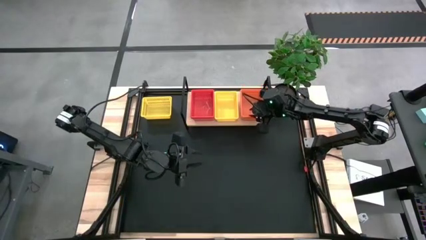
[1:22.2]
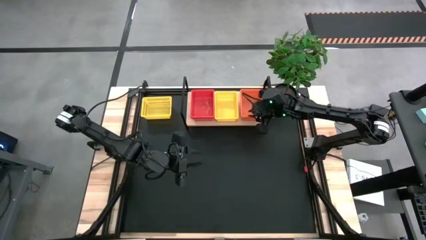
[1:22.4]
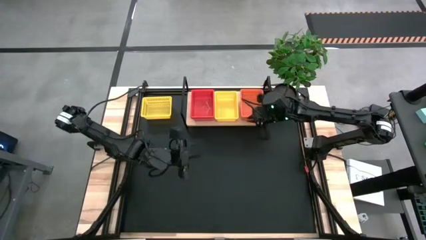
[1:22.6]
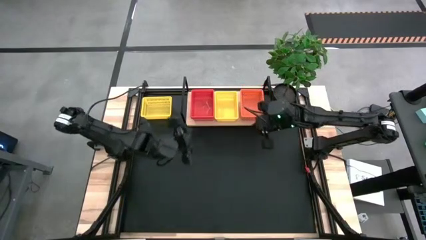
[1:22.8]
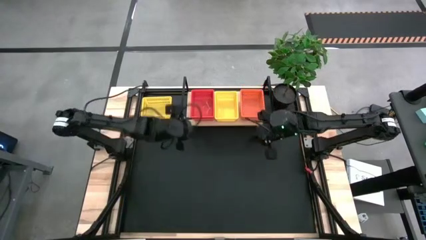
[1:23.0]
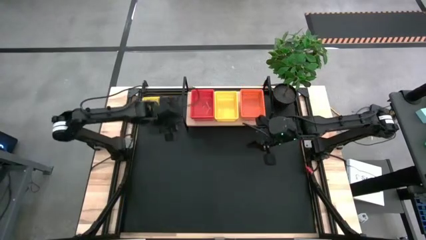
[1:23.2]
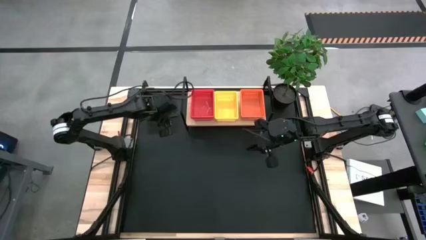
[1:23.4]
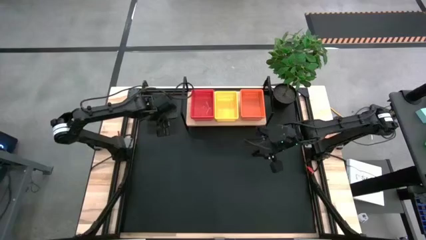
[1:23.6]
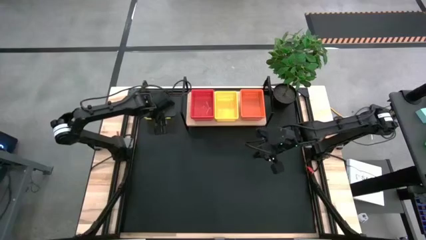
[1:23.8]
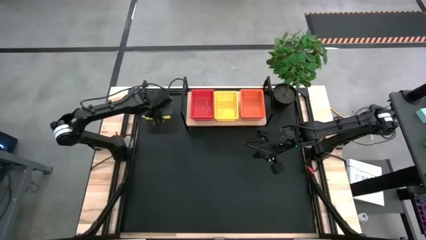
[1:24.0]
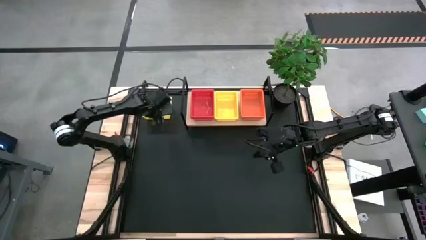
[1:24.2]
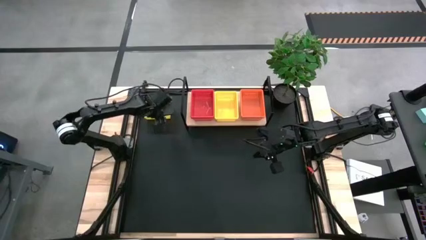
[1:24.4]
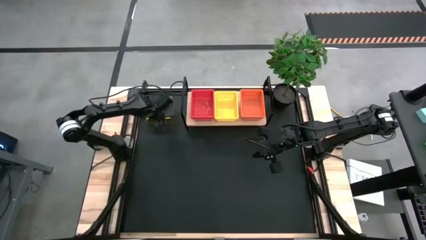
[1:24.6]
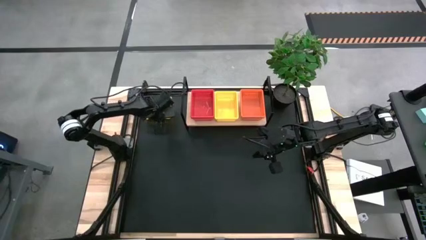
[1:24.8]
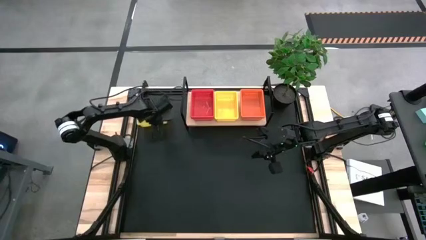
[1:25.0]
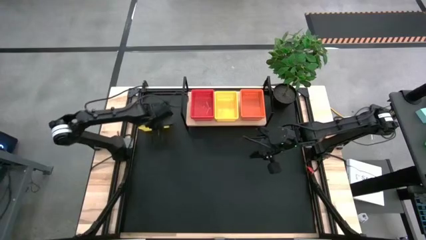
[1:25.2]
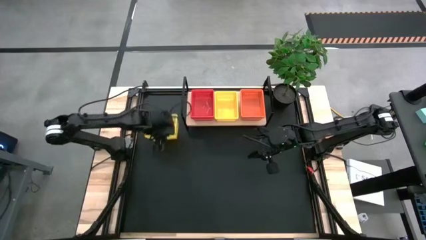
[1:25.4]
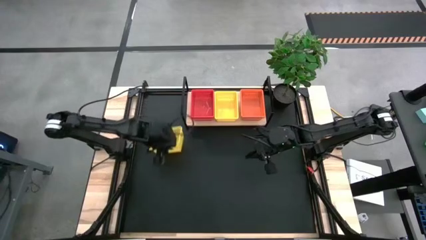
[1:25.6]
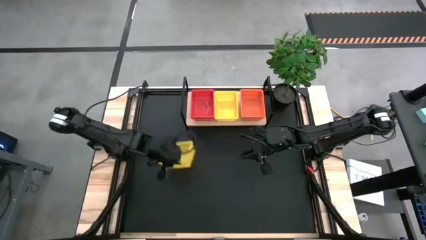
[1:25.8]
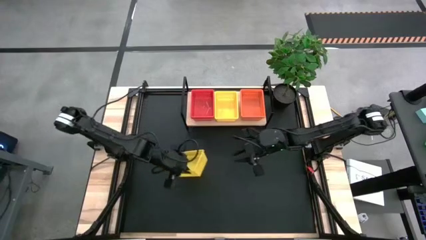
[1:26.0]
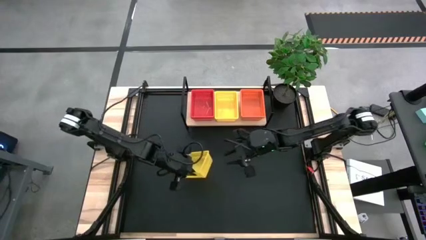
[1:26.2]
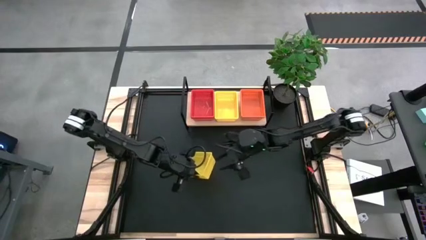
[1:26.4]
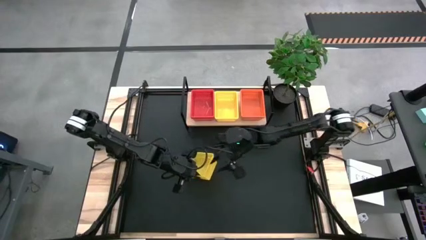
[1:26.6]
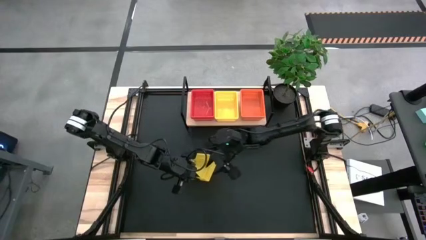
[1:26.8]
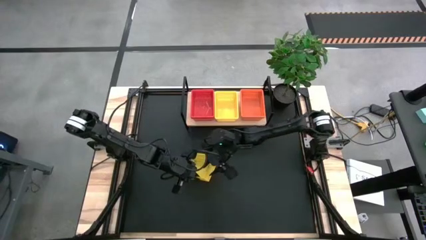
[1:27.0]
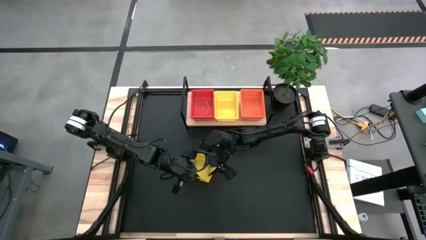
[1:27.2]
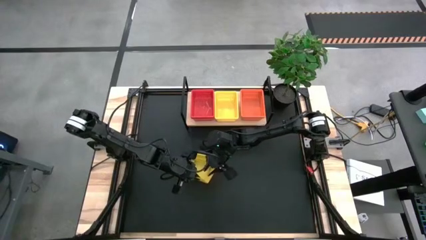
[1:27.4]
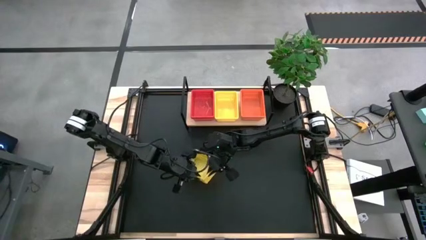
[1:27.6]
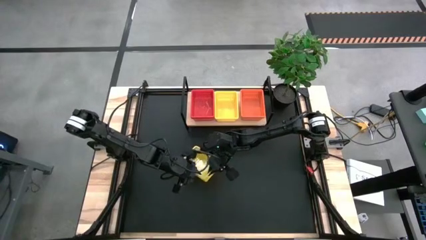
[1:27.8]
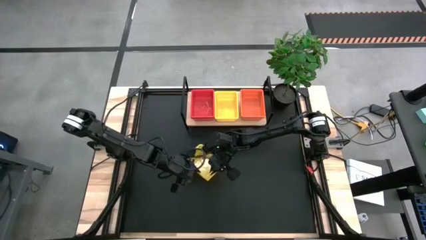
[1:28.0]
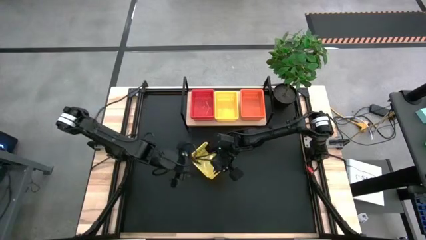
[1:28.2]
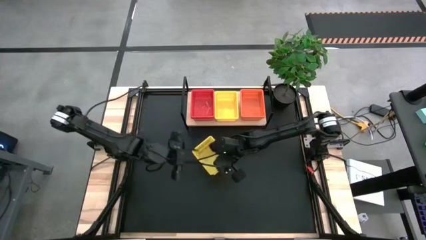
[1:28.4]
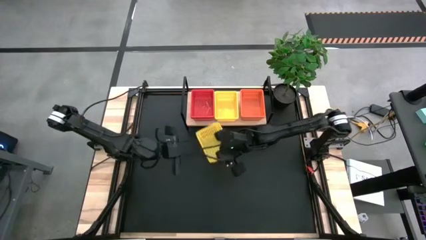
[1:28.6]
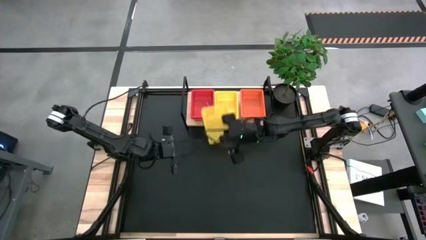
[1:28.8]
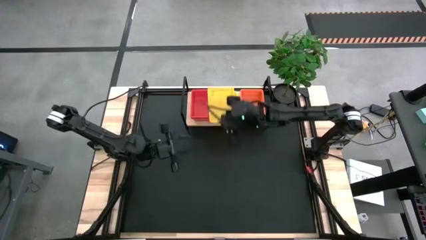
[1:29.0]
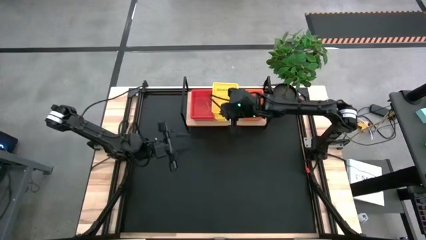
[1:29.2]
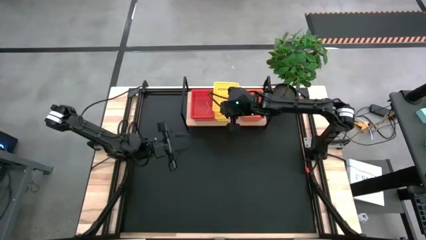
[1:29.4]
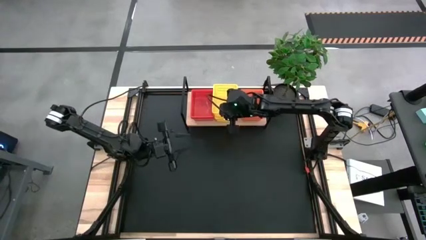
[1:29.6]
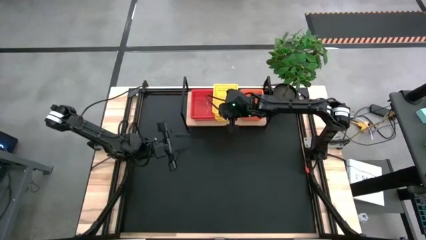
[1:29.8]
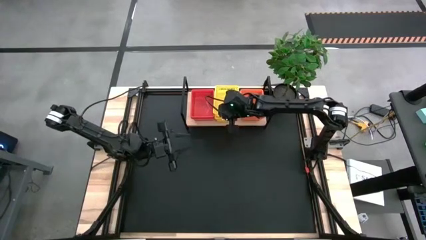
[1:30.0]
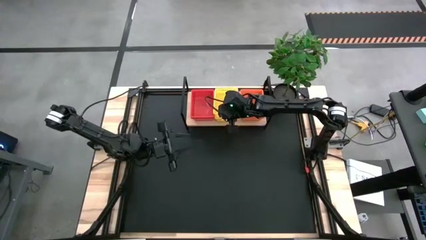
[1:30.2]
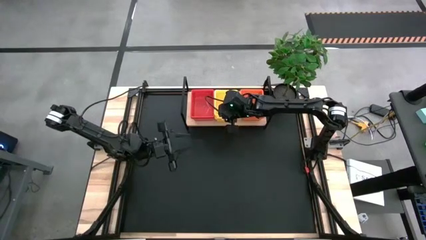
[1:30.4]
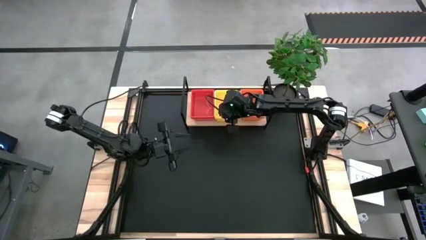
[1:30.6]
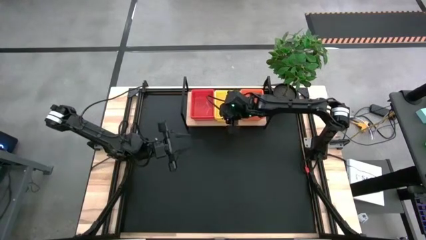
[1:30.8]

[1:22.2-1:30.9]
Task: Stack baskets on shelf by color
Stack the yellow bin on top of the yellow bin on the shelf

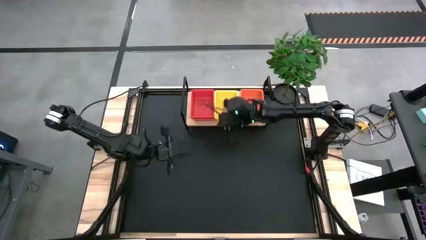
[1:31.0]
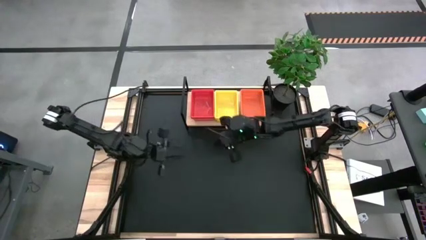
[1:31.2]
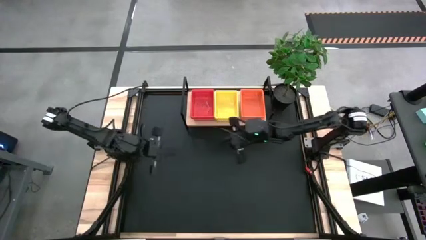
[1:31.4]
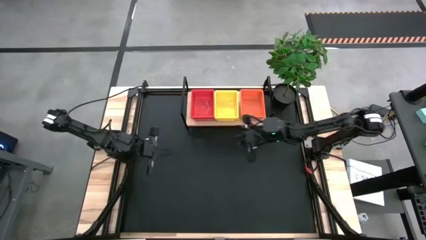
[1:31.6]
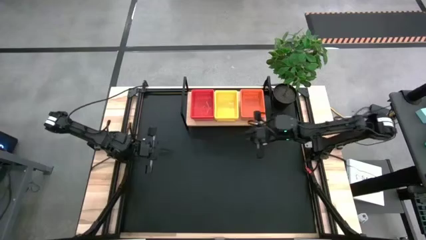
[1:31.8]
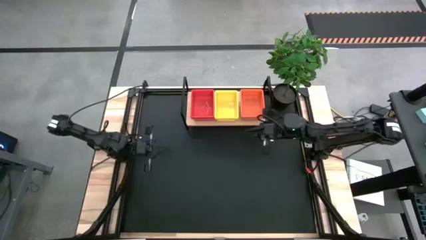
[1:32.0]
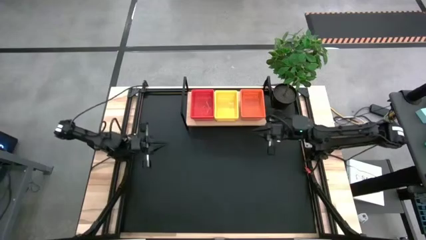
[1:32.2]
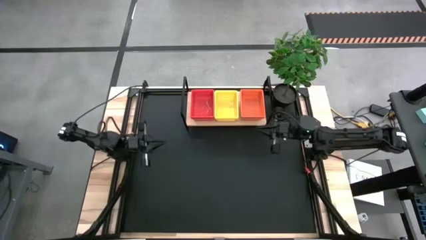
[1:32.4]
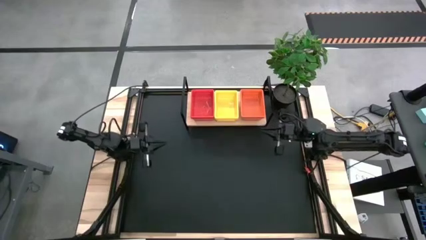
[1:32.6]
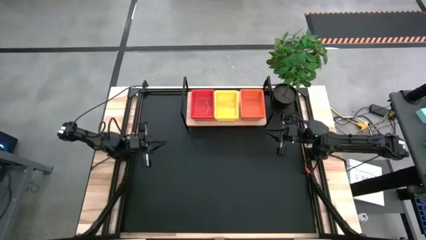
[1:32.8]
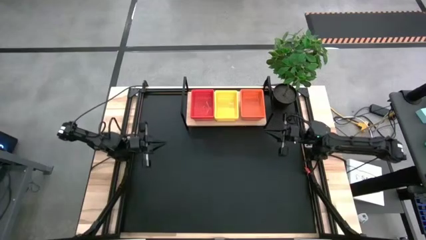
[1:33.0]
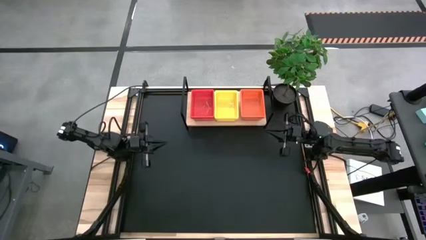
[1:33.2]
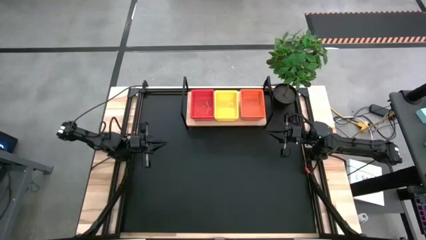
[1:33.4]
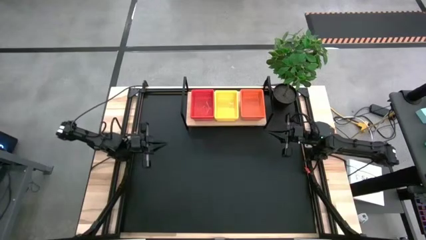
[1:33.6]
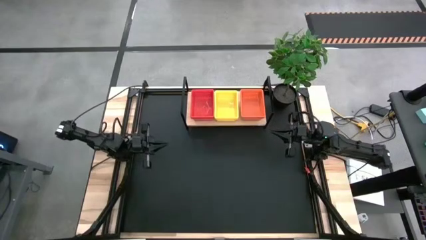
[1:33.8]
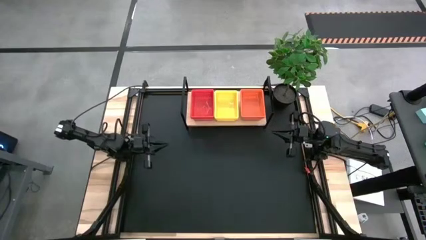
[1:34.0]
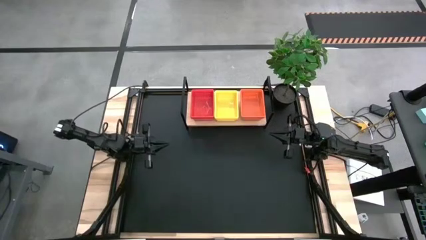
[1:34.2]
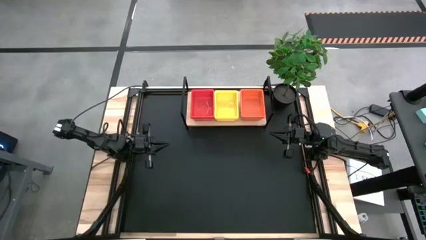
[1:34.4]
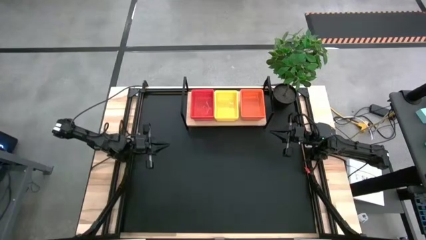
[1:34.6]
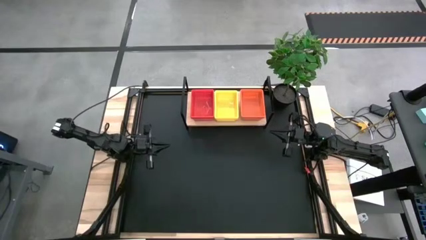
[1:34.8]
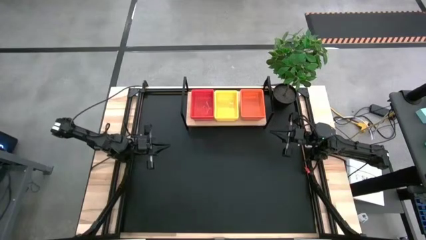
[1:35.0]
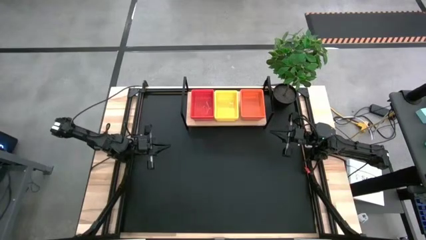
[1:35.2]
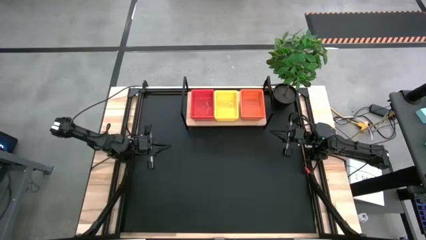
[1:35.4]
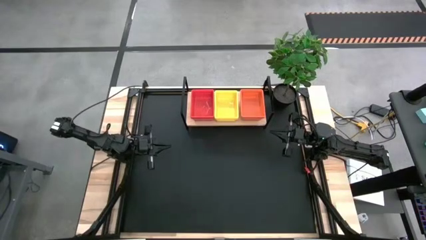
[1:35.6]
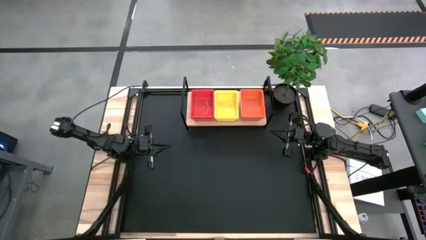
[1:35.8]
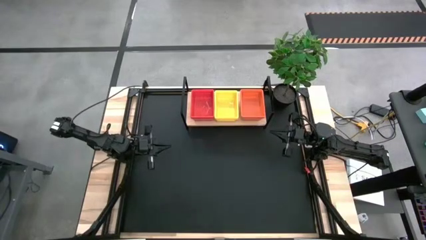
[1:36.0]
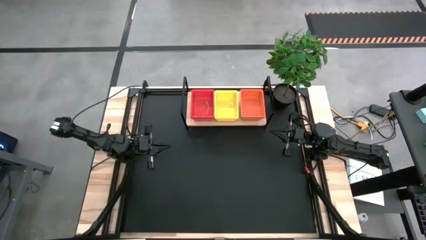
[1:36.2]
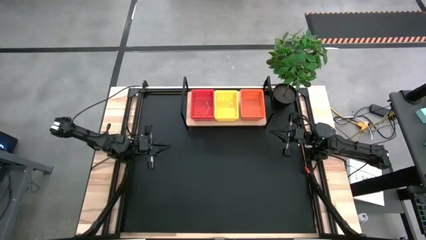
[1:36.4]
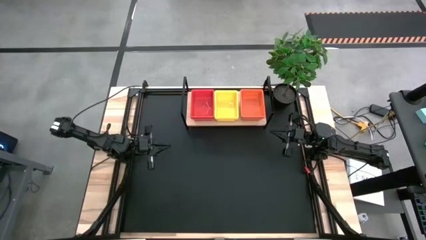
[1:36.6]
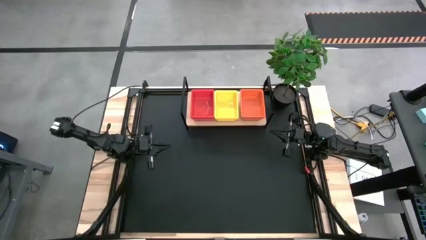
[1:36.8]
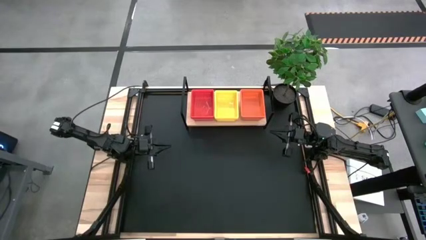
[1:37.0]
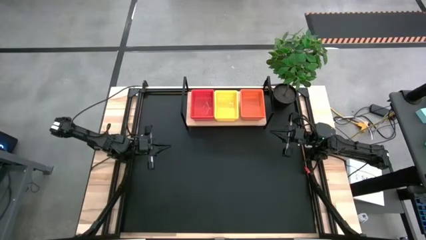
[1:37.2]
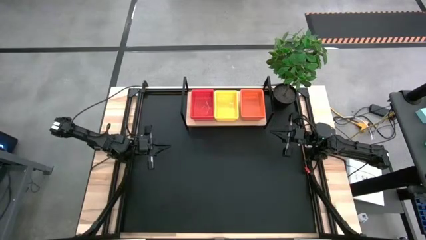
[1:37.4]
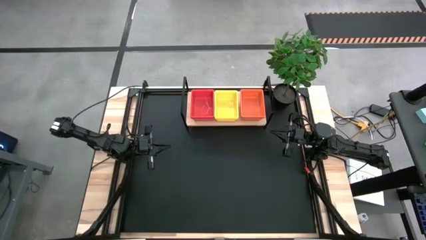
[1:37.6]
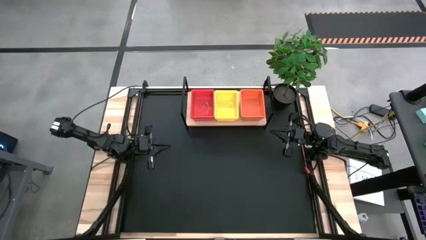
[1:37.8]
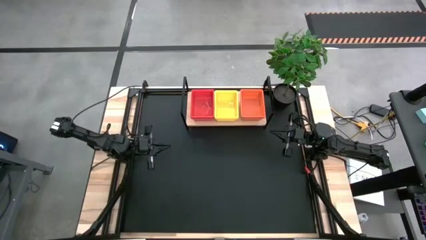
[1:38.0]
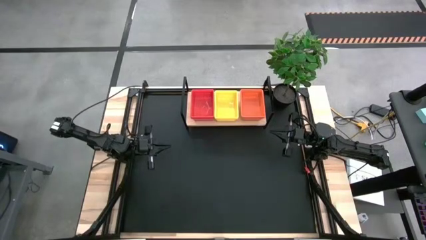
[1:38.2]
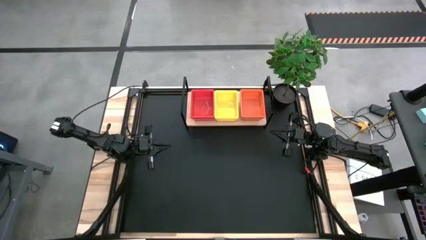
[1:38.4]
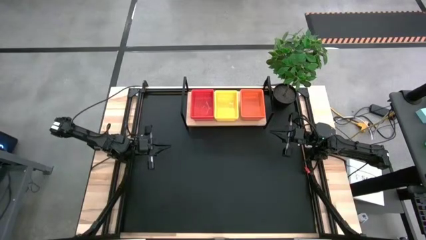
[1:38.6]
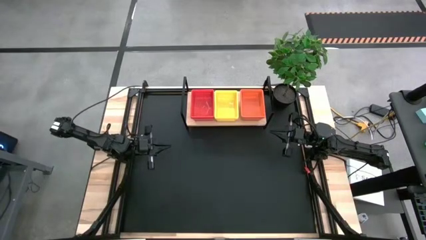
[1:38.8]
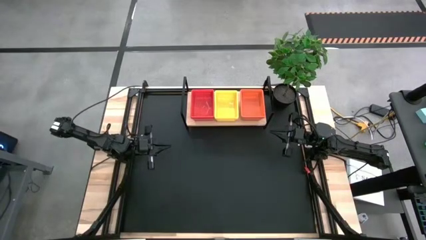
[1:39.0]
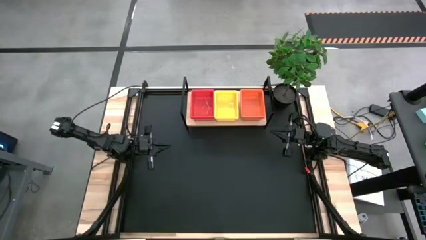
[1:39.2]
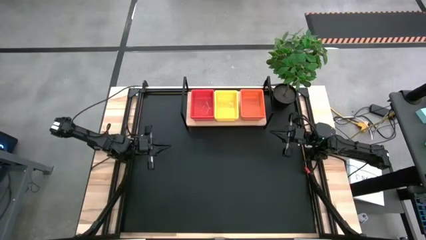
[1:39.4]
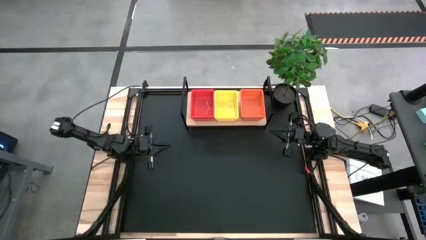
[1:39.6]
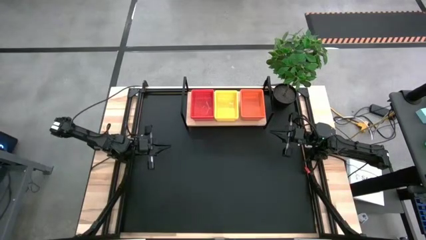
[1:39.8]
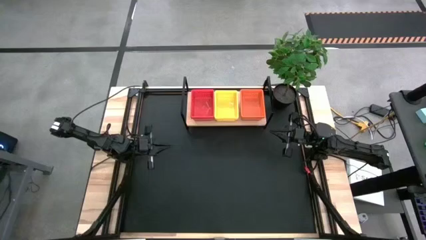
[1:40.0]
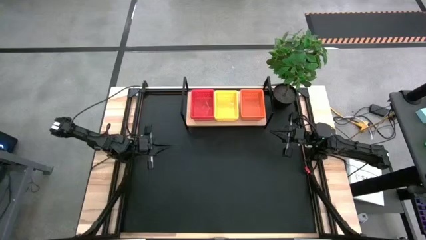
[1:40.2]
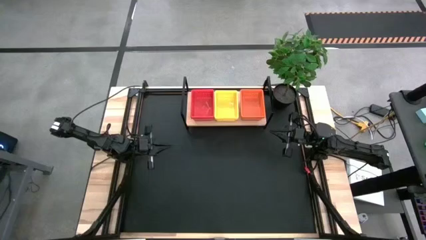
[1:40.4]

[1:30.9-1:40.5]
Return to Home Position
